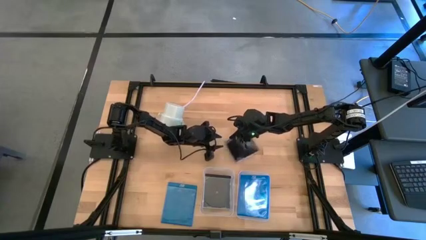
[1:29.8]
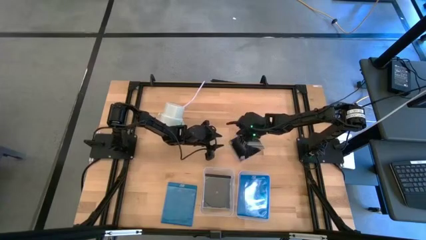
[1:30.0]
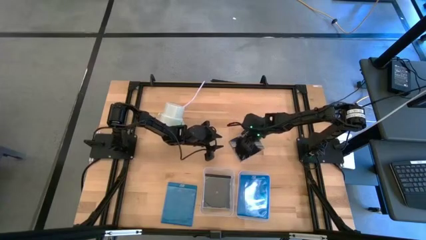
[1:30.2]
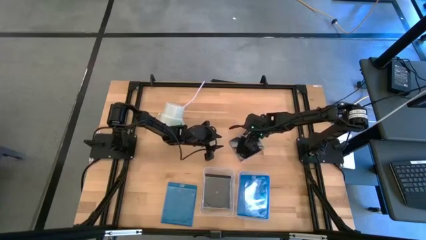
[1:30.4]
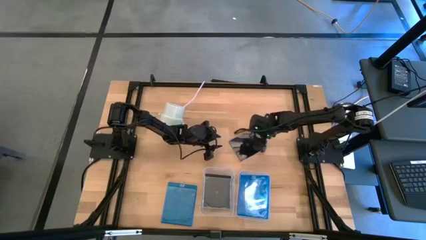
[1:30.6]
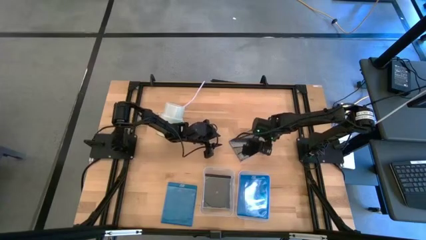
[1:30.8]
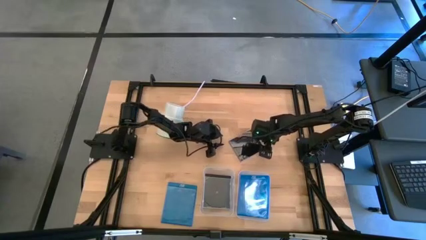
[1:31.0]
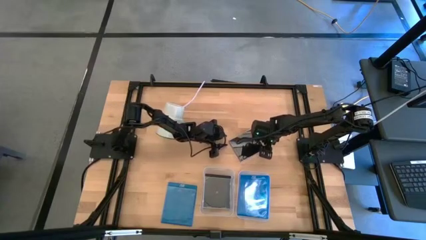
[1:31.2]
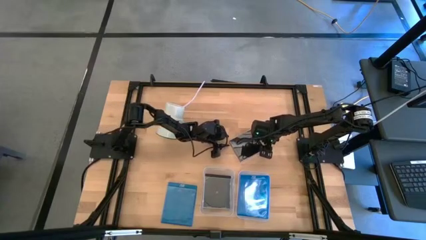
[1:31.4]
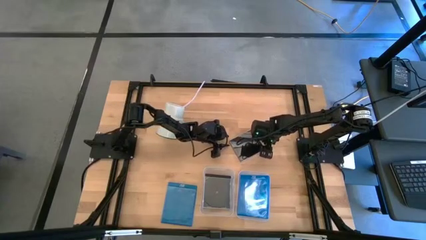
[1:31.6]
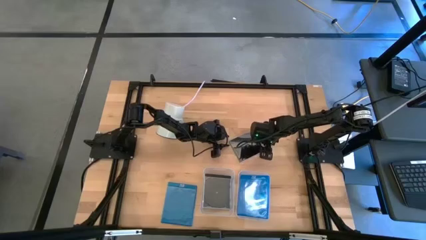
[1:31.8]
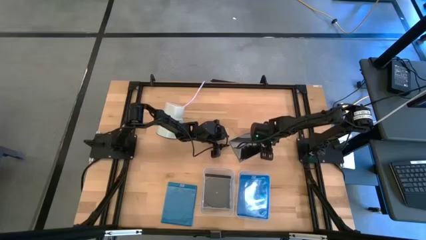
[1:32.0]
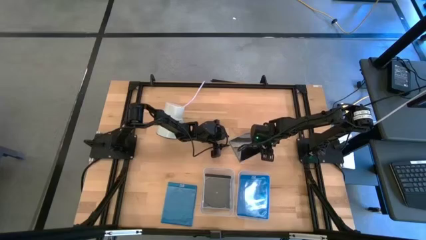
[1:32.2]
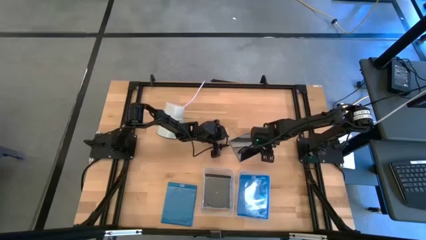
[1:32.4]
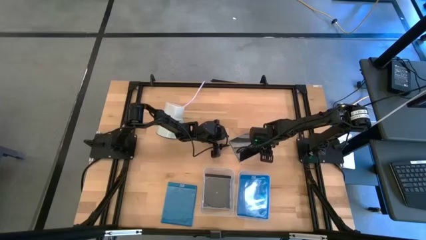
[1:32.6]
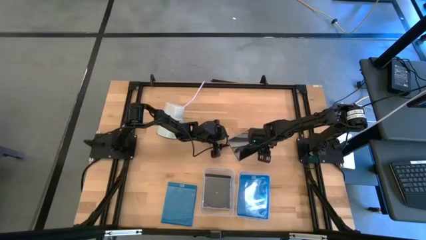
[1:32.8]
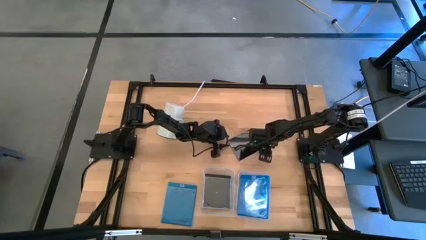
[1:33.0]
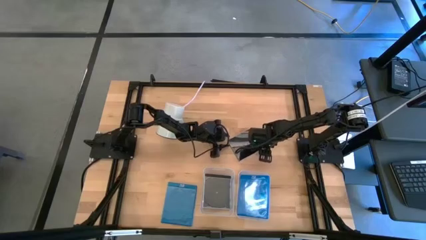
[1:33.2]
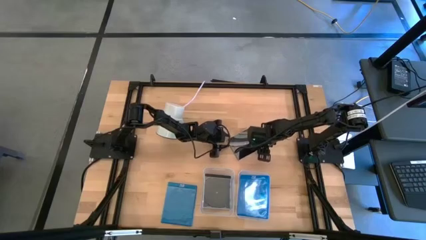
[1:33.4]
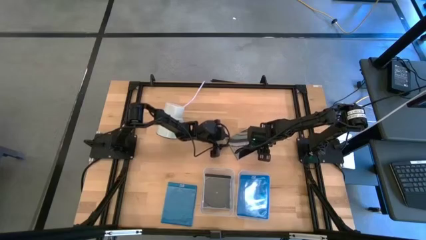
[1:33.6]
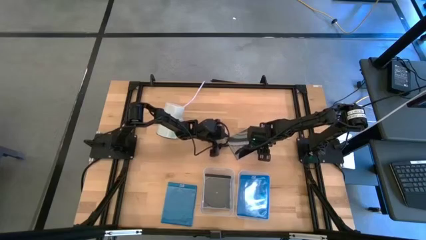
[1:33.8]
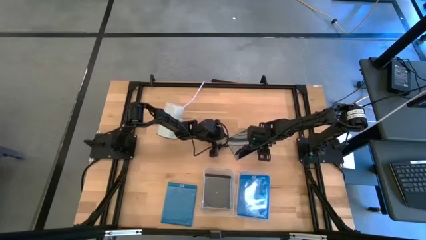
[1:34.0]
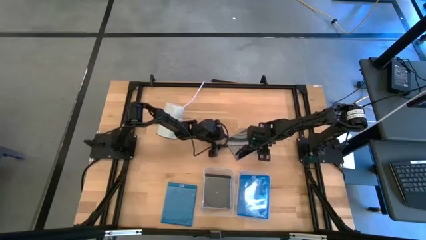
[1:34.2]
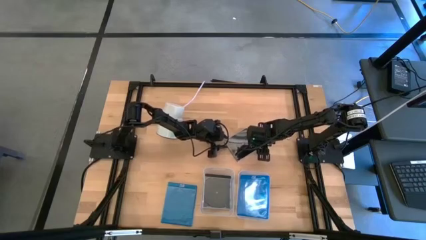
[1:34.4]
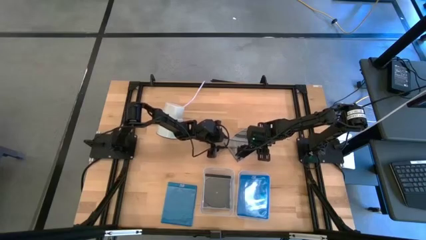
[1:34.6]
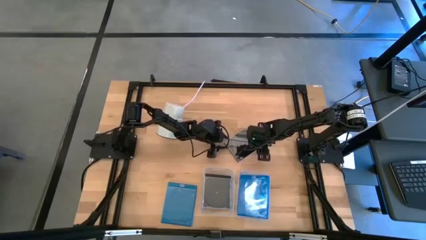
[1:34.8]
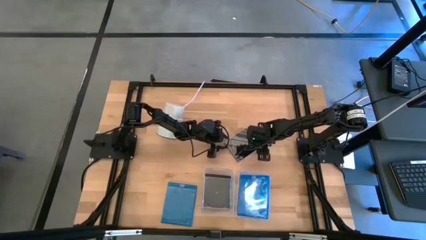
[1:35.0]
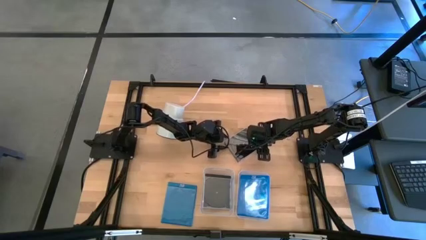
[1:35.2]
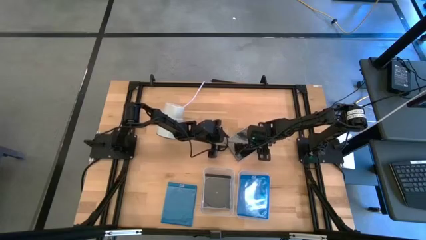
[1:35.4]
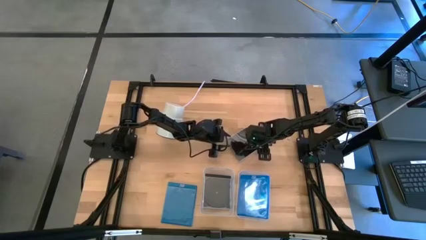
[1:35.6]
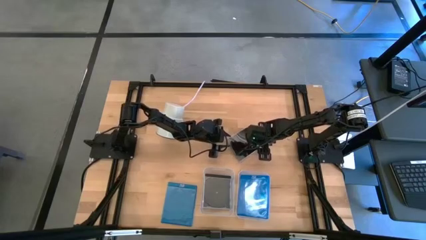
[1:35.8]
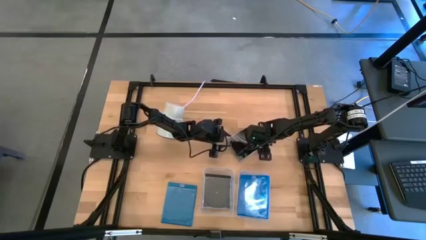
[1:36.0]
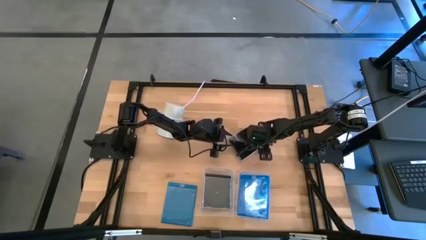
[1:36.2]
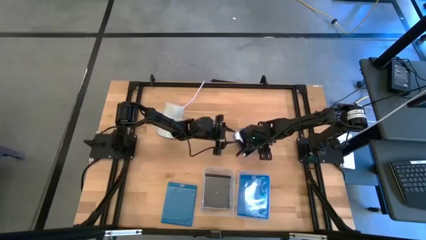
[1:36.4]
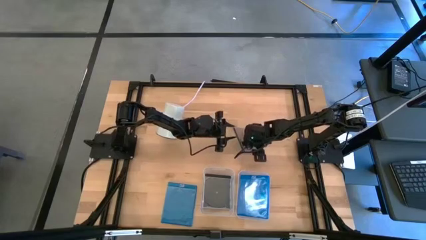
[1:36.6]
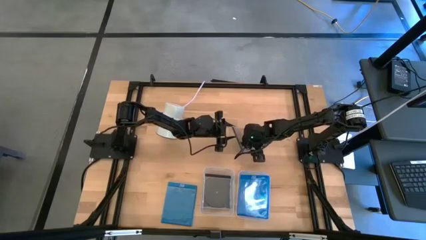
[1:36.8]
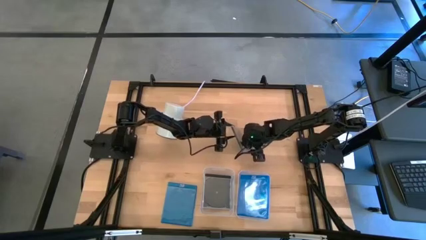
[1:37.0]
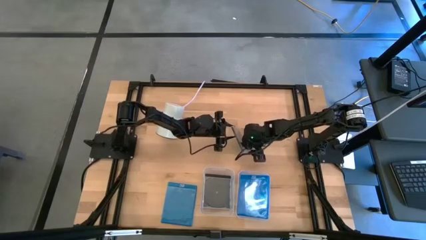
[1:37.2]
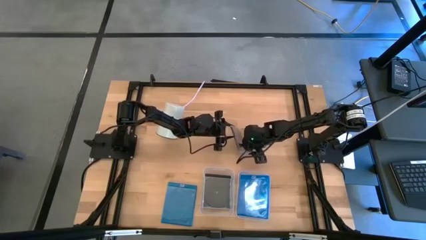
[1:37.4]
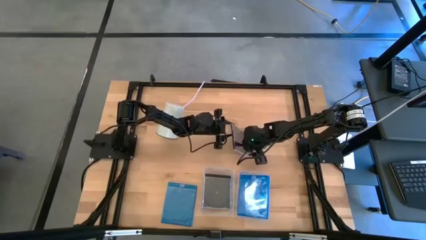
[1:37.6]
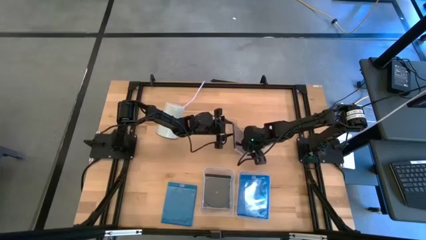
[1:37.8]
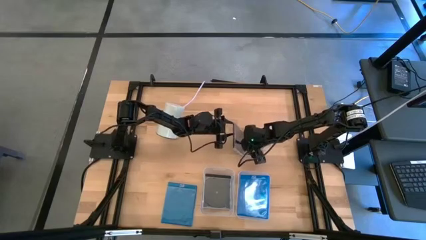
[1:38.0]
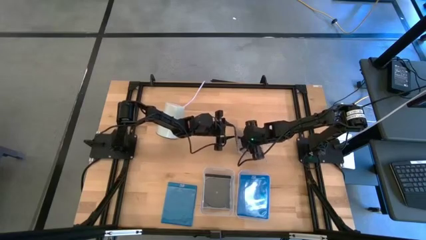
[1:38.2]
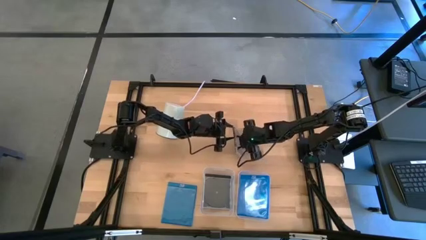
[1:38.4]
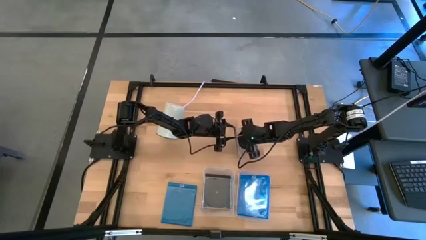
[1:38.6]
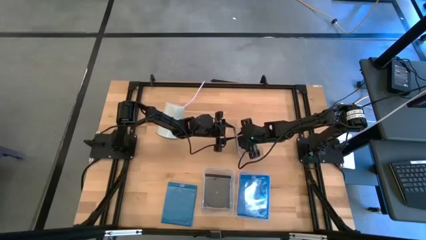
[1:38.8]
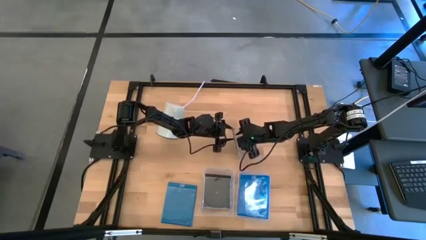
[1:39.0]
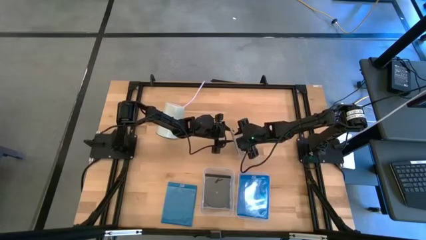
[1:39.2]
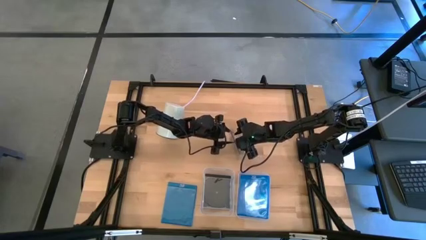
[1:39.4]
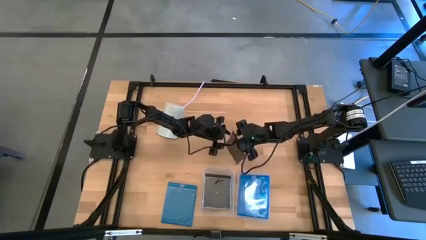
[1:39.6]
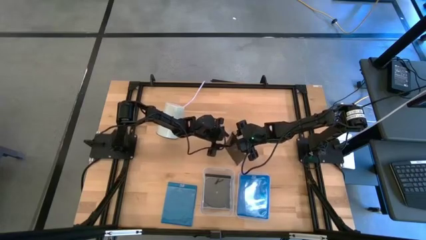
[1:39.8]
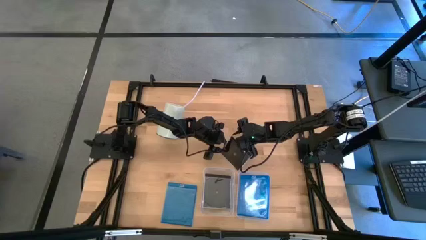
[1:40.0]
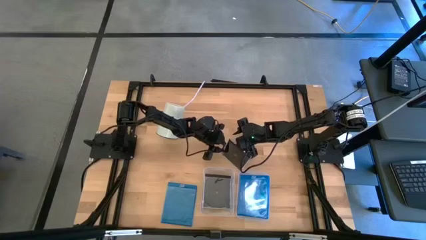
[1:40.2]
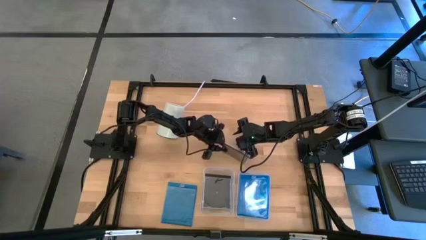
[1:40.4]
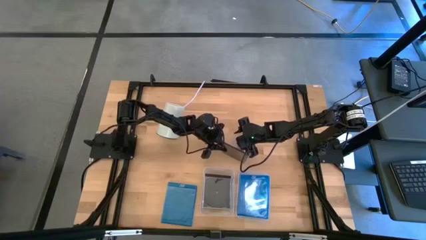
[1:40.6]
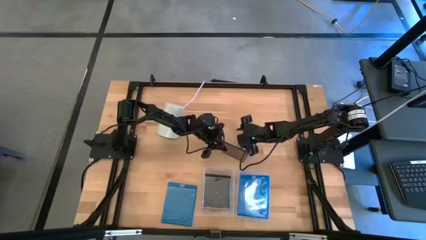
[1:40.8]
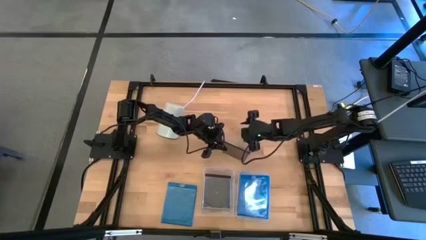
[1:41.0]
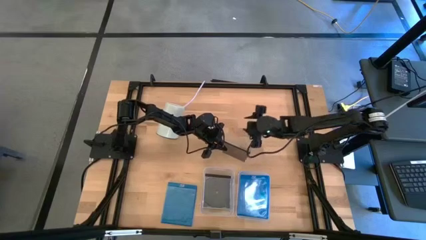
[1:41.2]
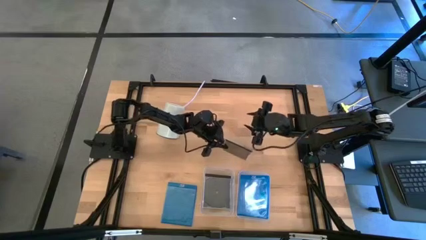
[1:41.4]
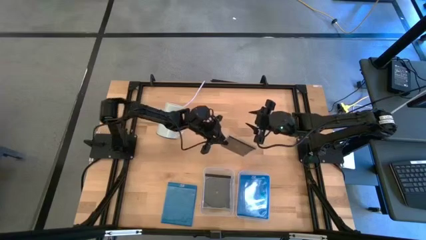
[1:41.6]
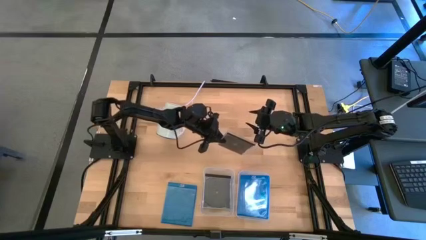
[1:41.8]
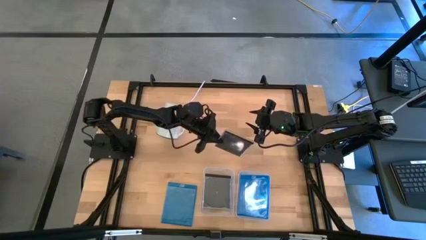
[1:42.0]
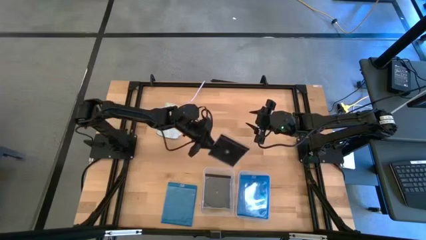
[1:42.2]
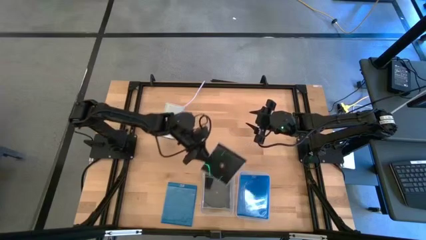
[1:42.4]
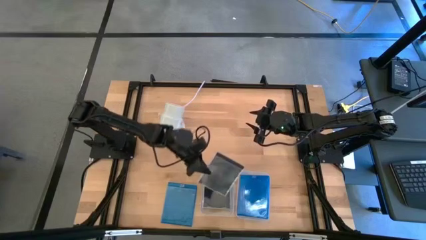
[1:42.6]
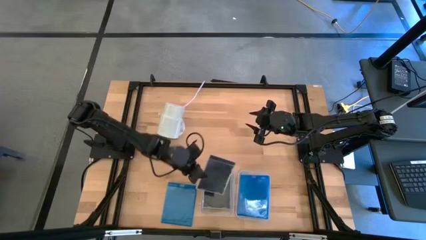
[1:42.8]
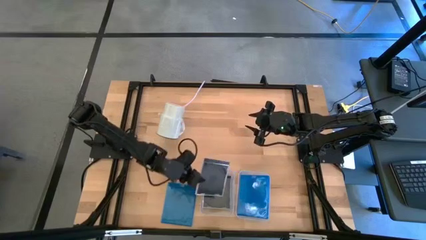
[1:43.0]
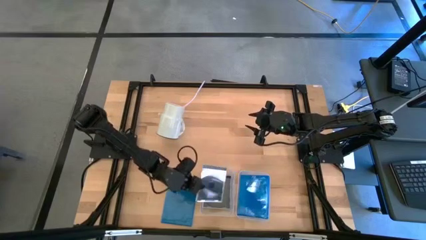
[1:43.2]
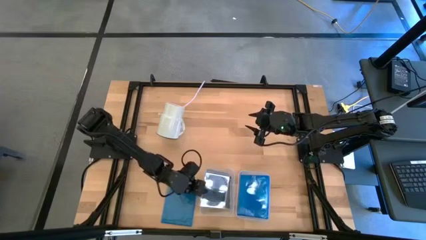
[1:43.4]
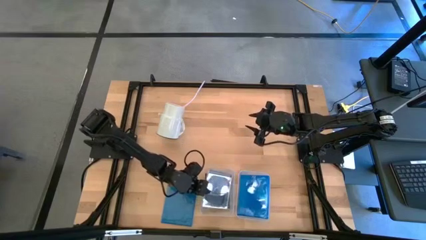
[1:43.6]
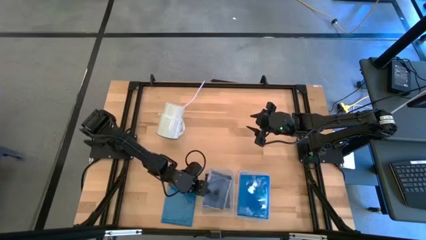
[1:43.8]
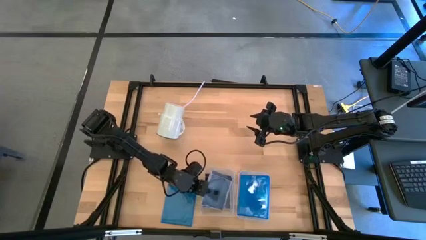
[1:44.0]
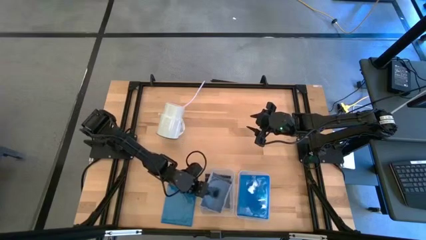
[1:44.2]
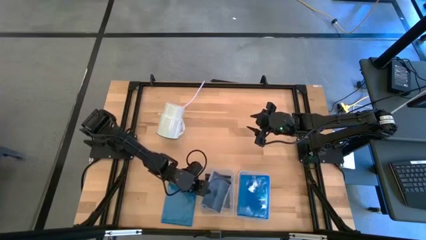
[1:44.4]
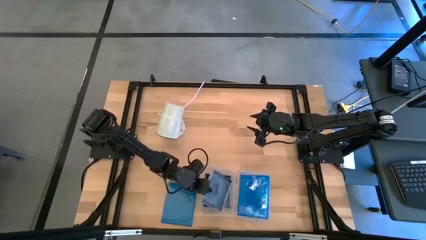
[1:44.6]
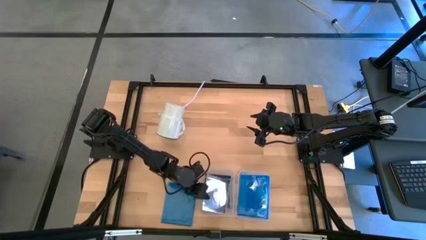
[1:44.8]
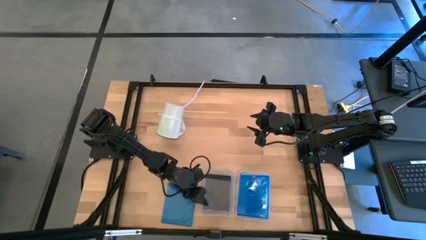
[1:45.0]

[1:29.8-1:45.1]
Task: Pick & place jewel cases by type
Put the black cd case into the left transparent bin
